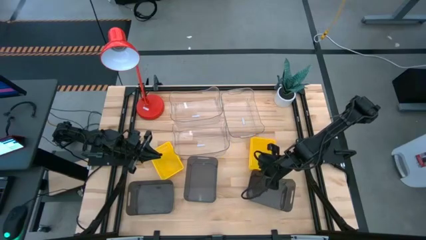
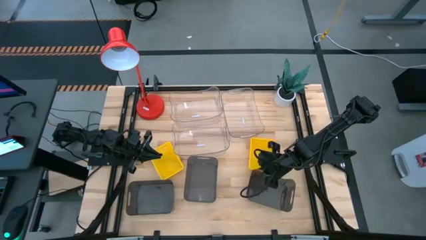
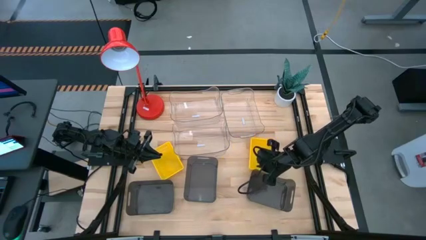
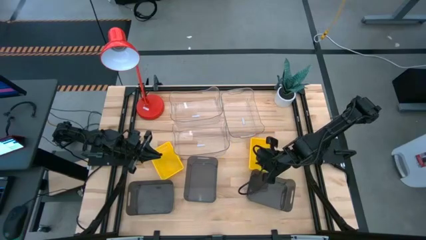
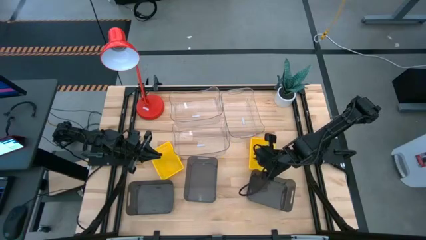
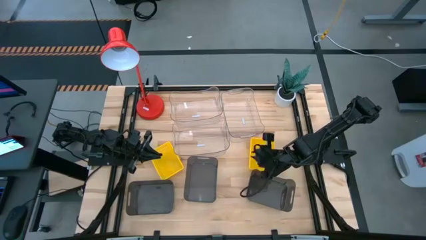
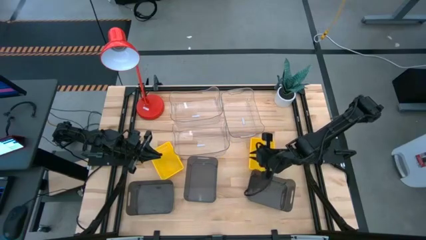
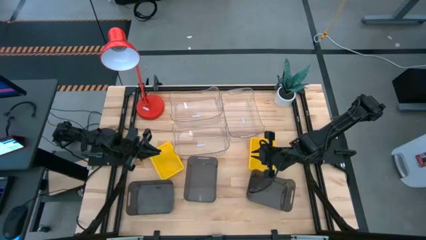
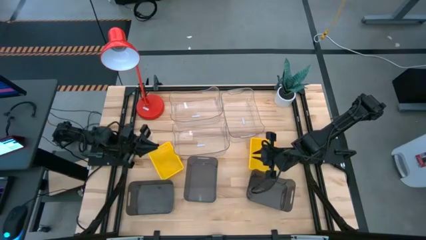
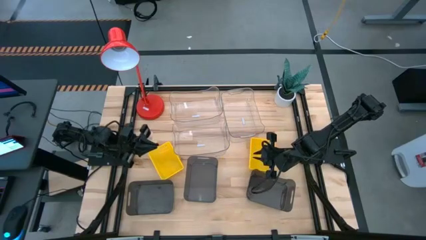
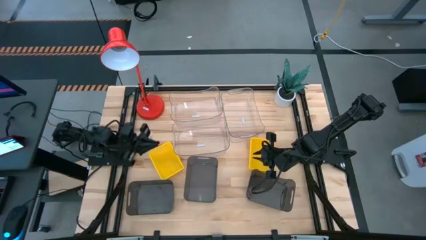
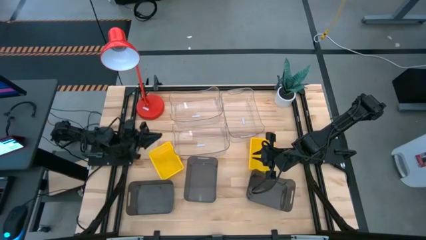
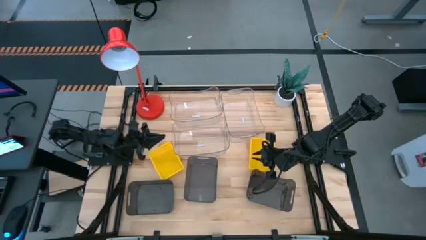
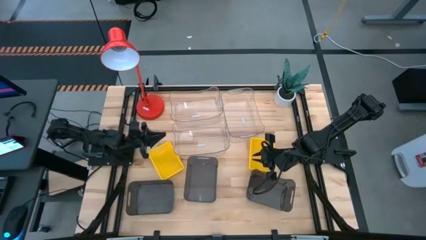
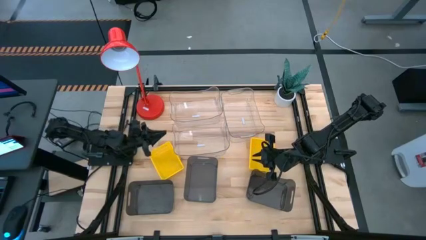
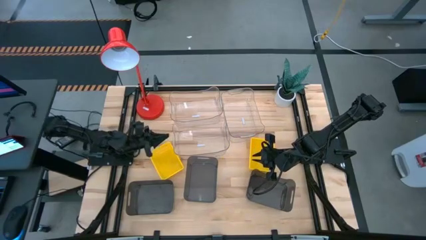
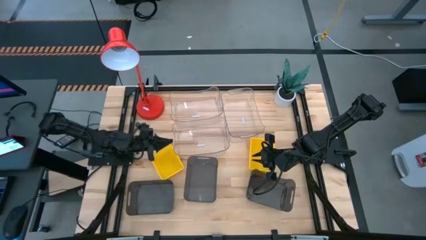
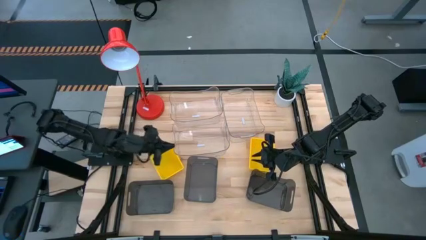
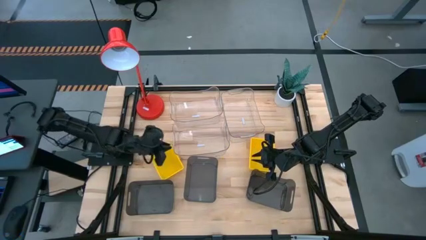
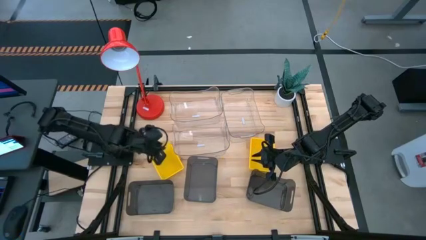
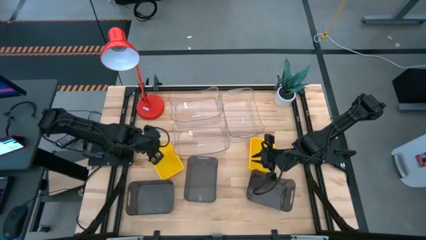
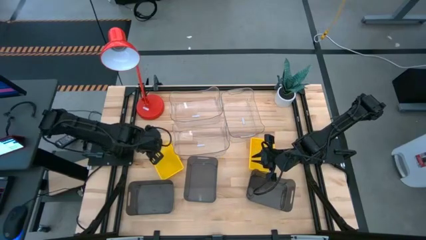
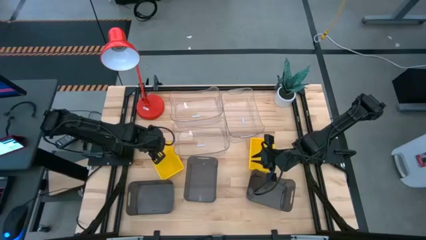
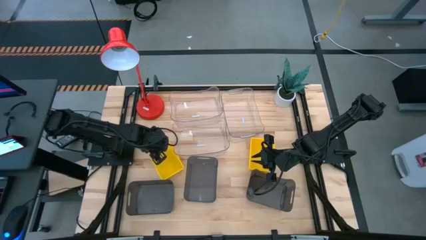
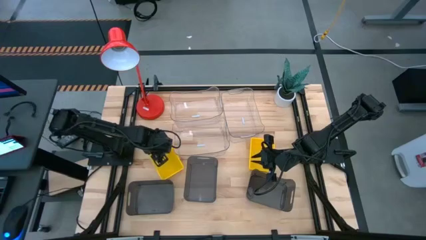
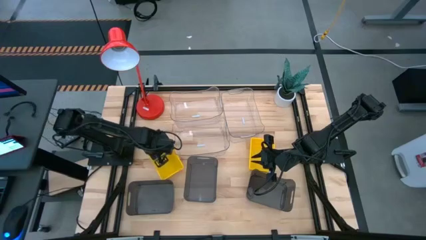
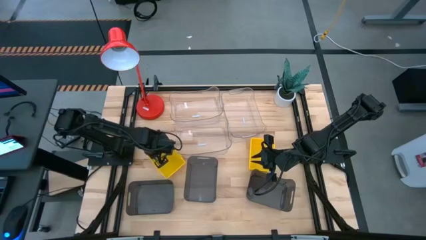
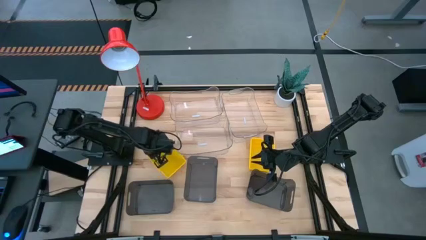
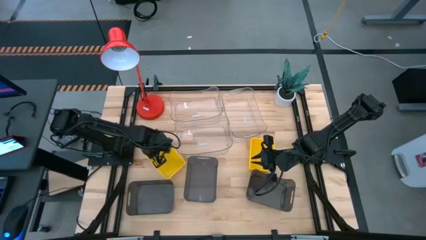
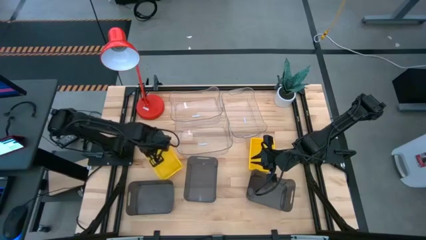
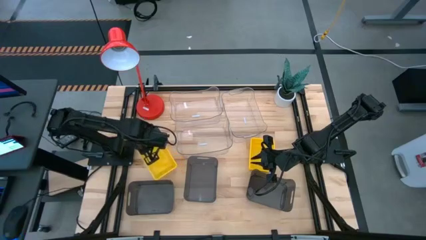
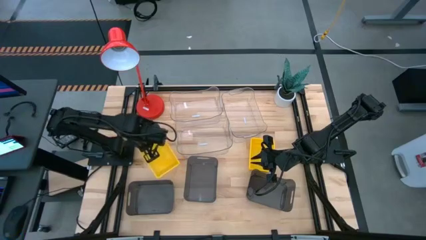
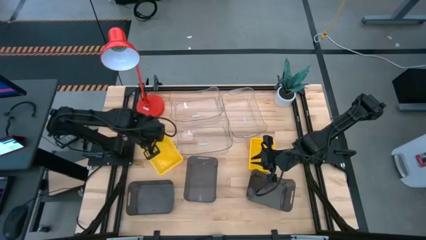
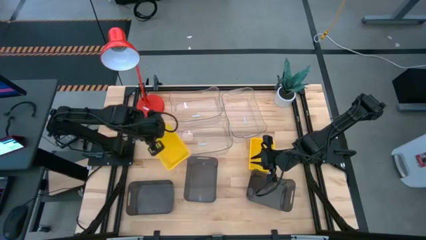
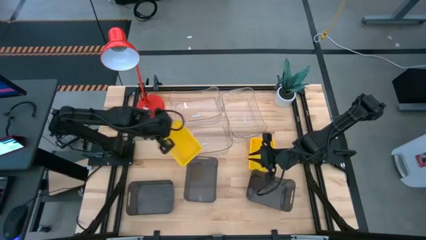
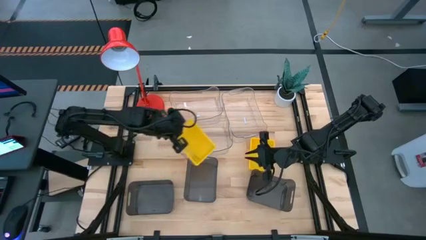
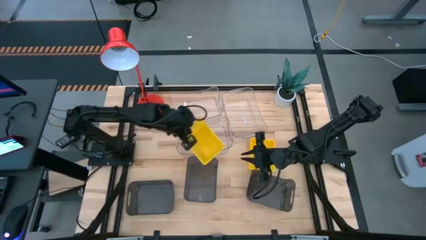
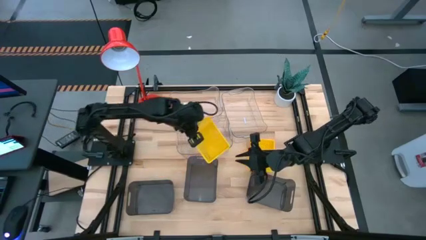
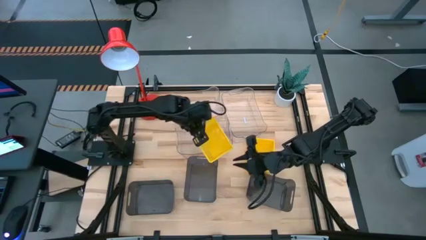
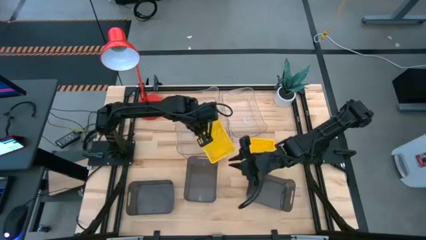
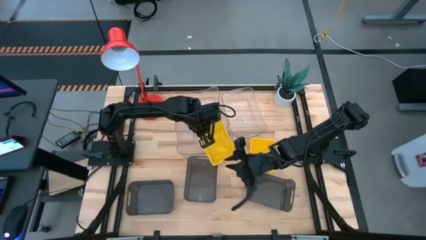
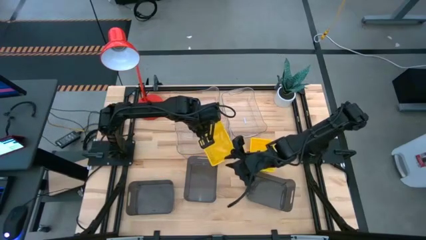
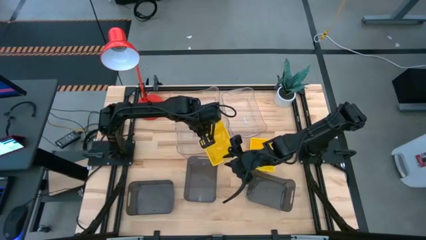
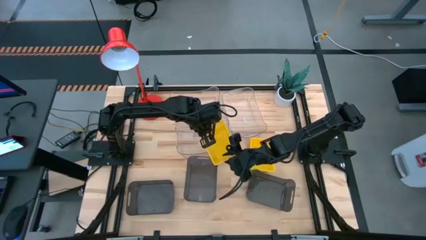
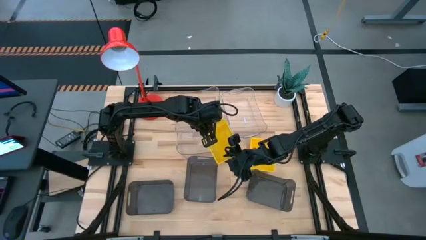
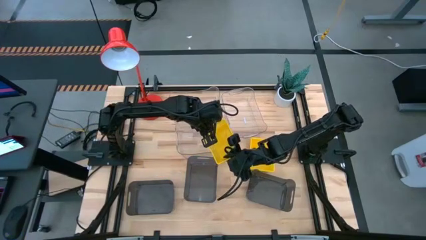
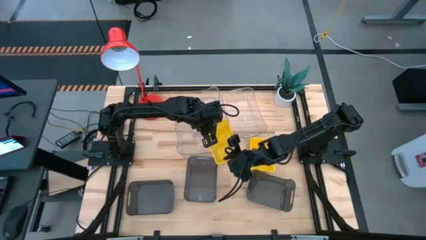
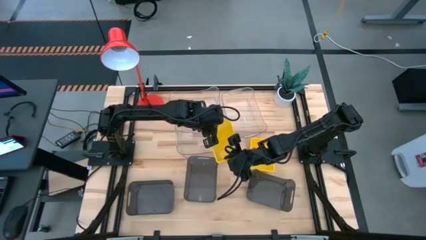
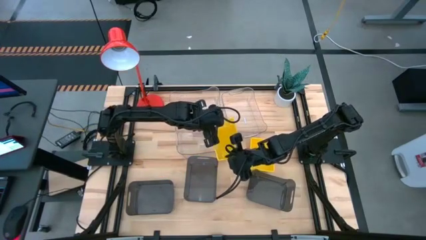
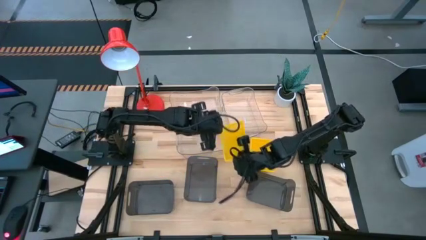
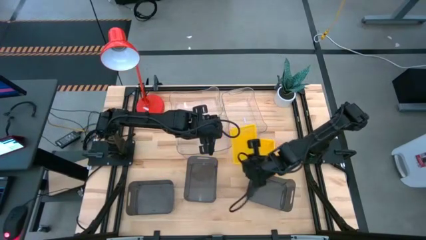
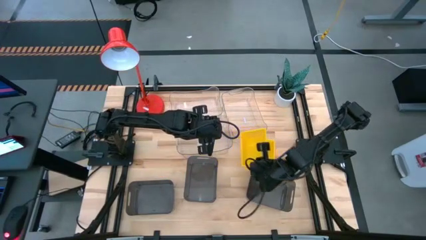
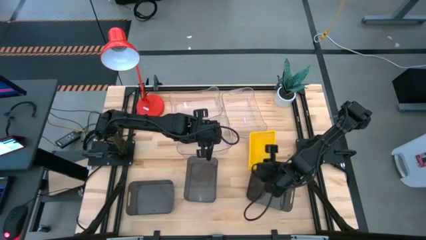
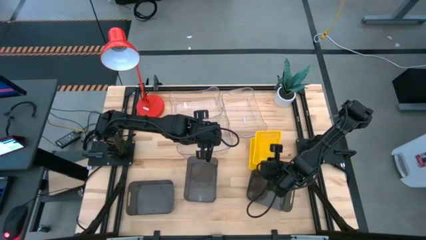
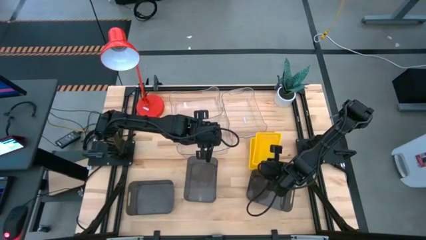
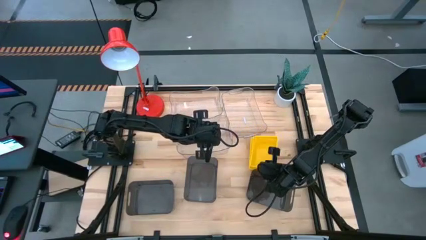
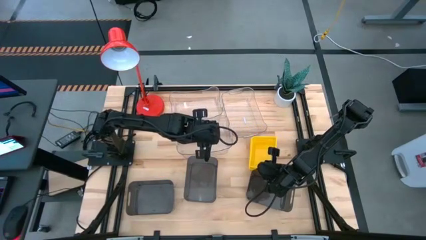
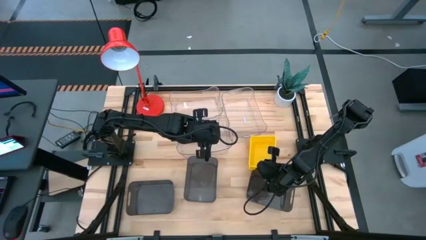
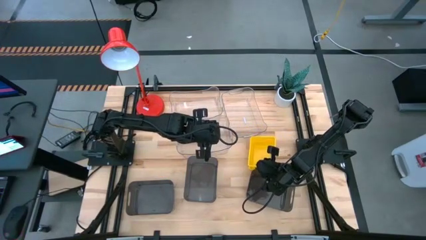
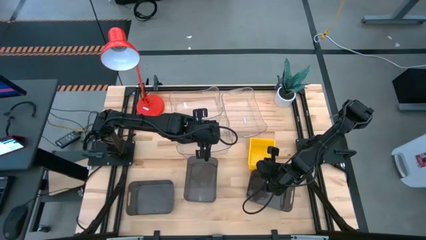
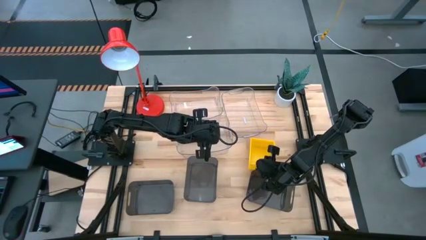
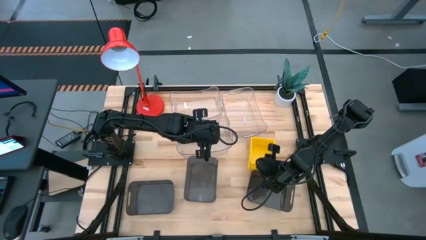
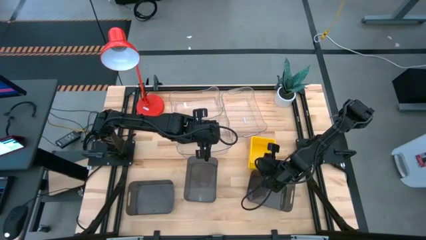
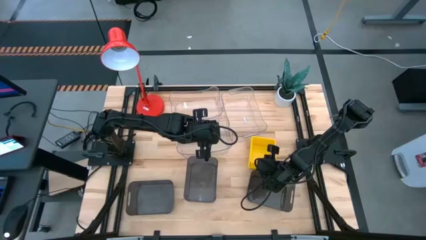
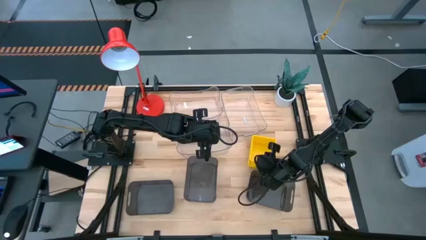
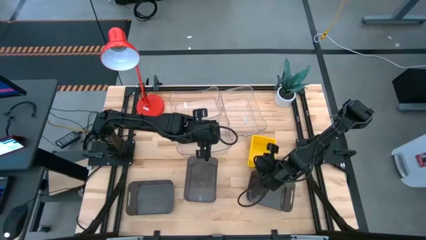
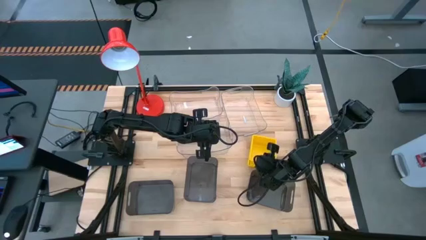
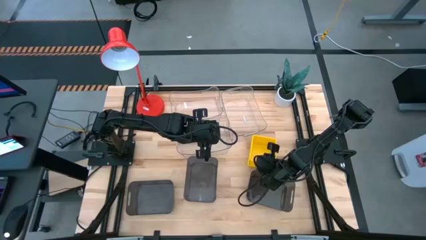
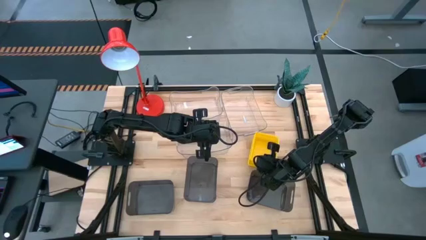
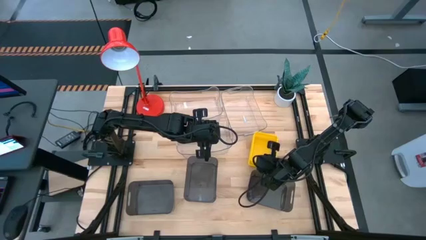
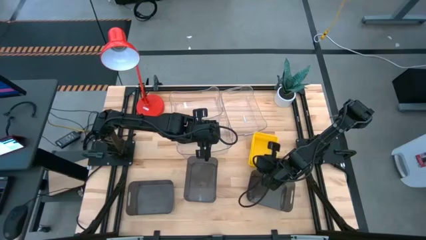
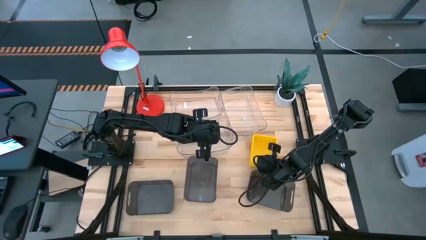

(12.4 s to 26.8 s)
Stack the left yellow bin on top of the stacked yellow bins
